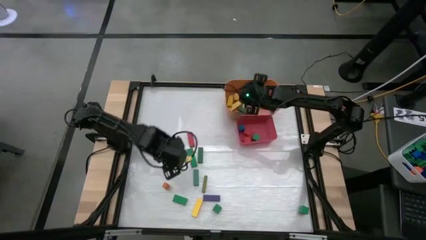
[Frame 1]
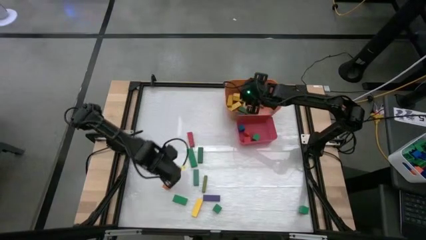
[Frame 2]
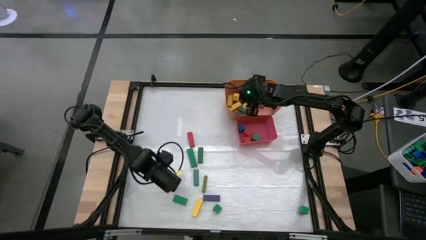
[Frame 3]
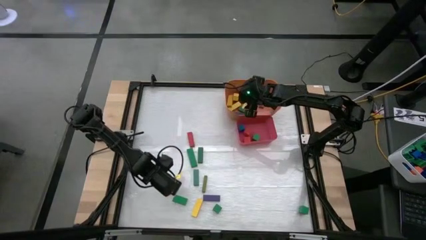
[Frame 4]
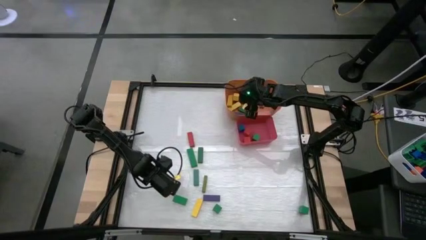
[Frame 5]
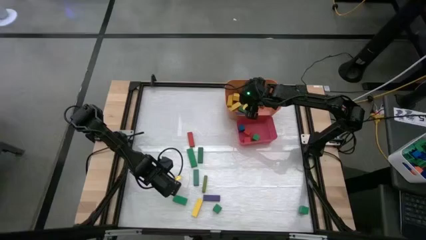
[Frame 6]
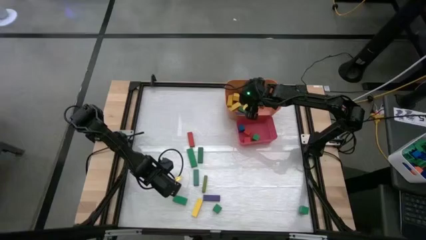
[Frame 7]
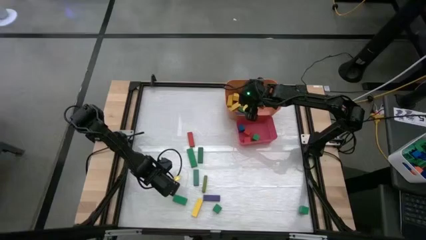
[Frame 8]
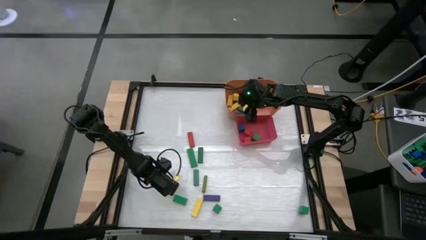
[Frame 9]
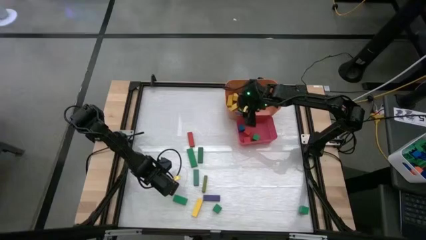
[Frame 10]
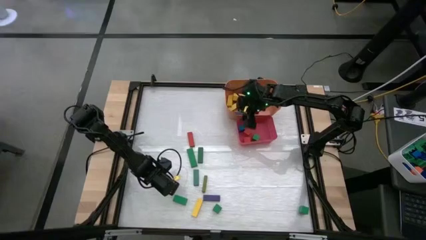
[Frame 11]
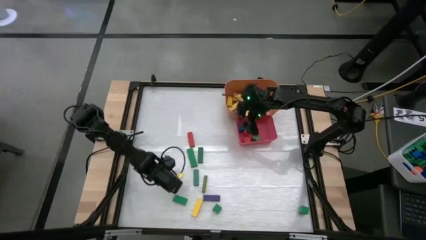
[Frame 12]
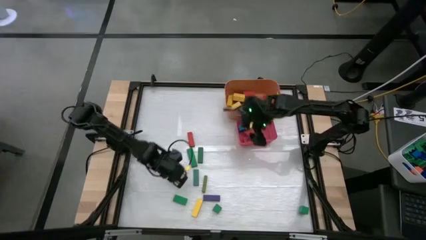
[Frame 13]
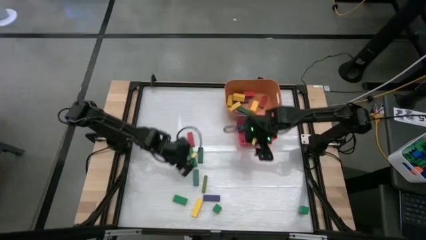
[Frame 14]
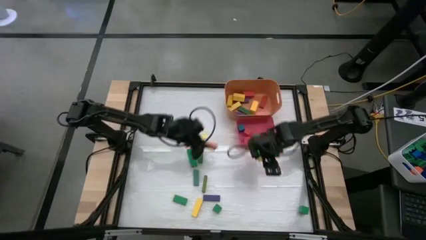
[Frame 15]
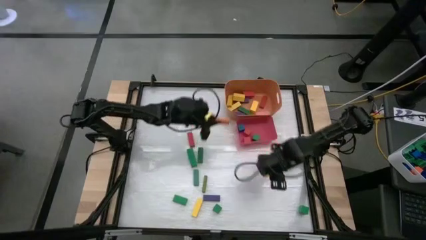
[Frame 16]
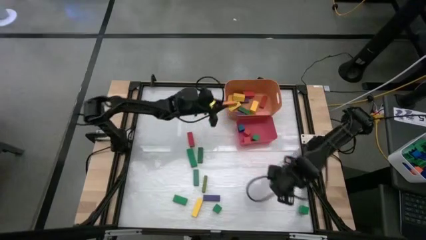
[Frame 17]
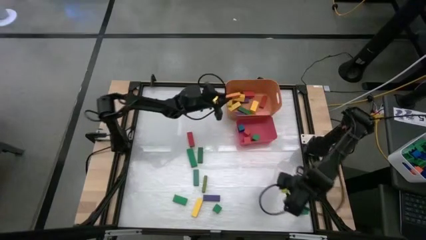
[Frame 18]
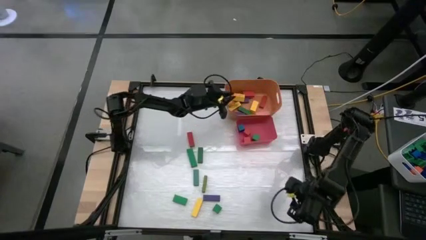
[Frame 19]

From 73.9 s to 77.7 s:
Task: Sort blocks by size
Put the orange rectangle block into the orange bin

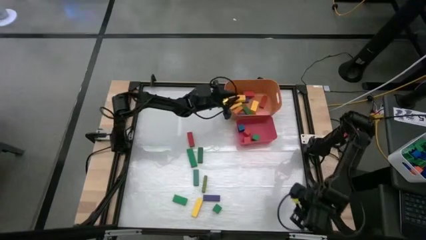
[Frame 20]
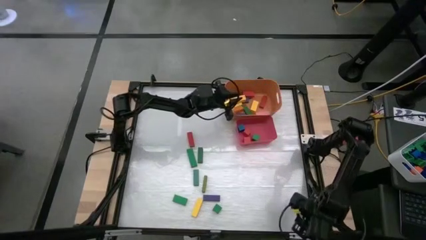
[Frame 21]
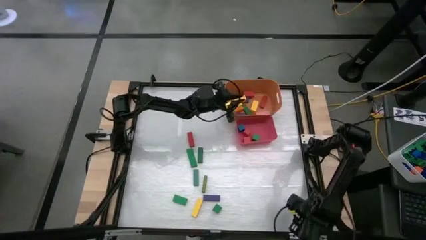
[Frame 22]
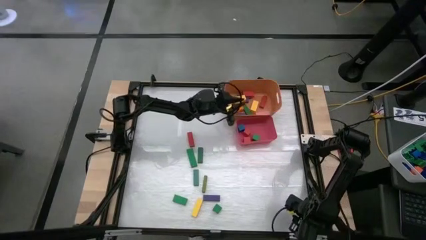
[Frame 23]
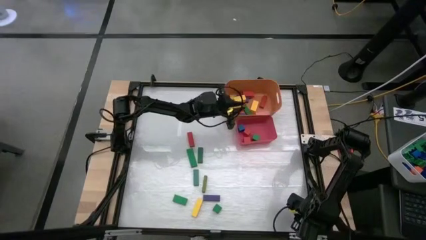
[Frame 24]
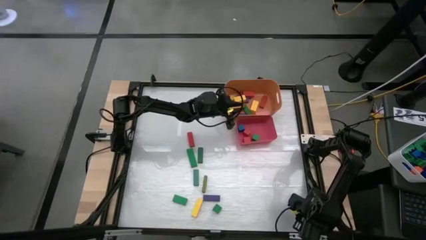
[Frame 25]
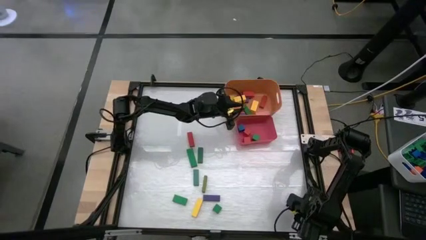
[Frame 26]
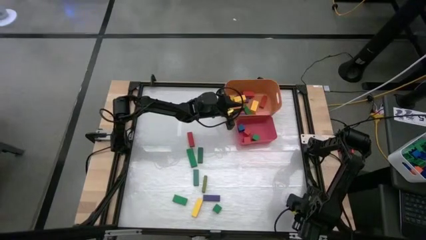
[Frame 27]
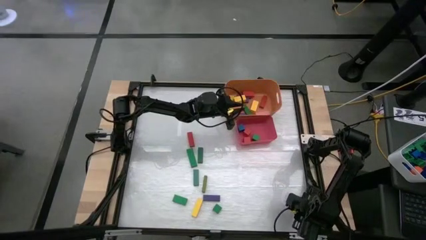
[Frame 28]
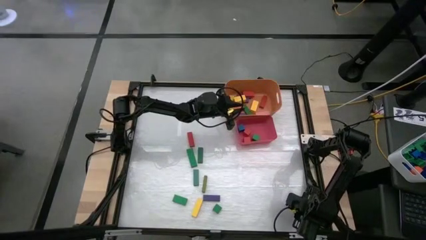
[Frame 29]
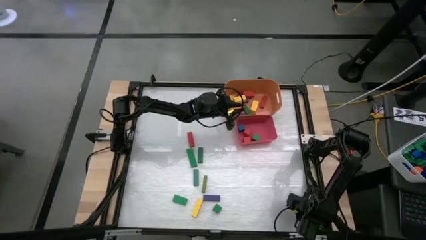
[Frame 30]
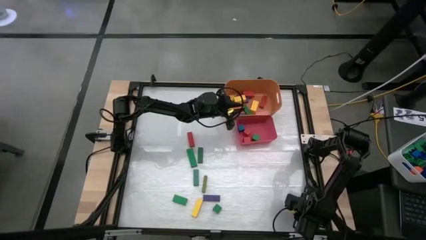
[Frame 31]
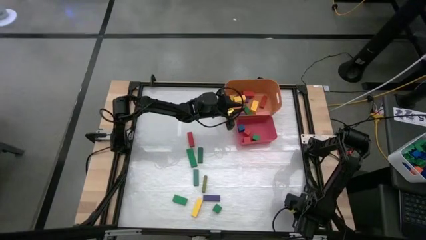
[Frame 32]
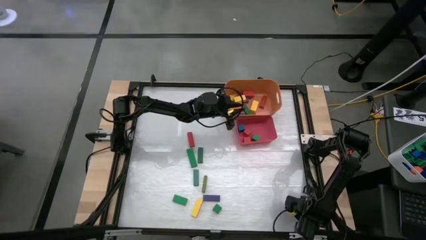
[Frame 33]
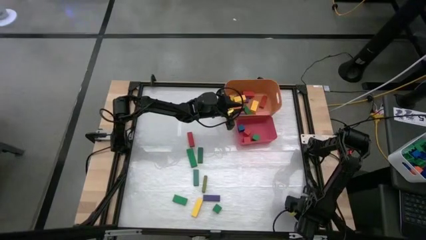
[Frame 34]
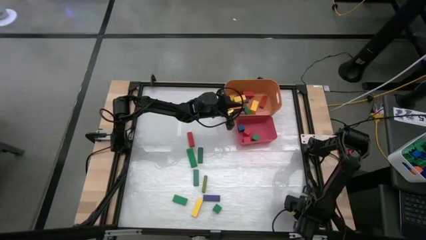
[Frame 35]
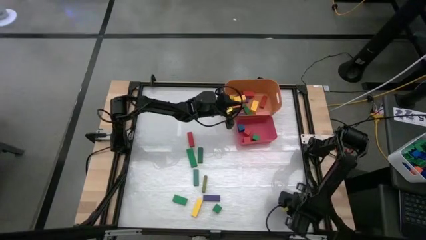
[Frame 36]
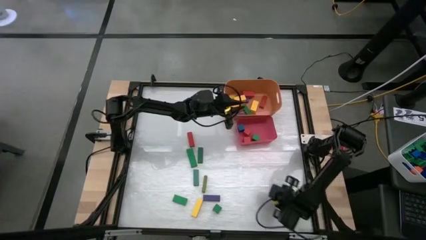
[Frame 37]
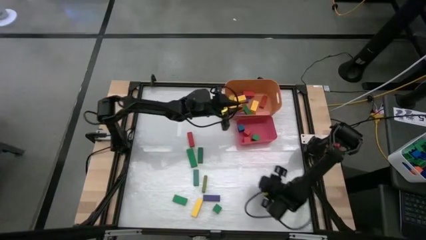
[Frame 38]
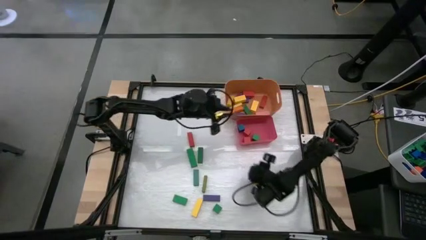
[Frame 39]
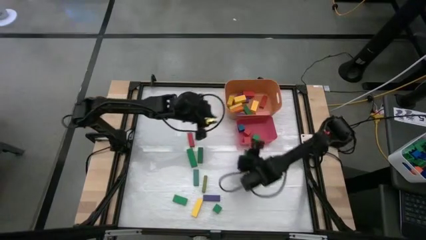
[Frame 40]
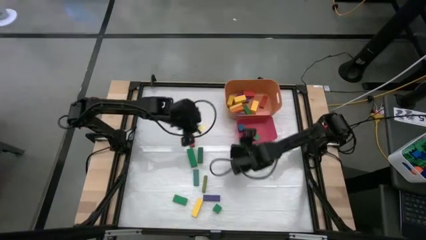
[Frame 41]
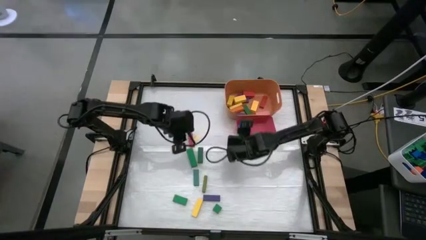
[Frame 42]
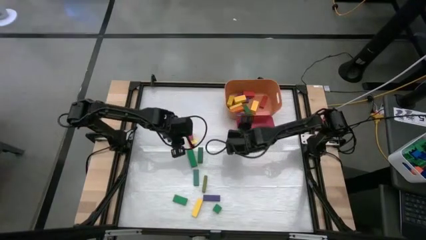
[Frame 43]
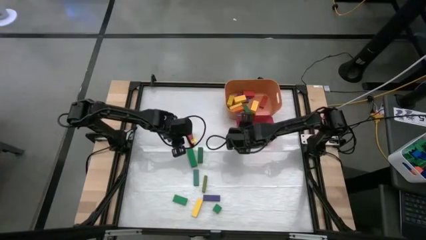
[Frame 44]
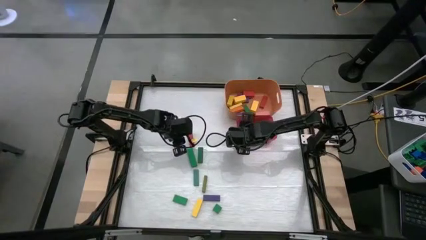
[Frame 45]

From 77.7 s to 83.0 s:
Put the green square block into the red bin

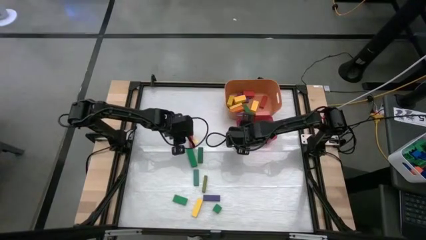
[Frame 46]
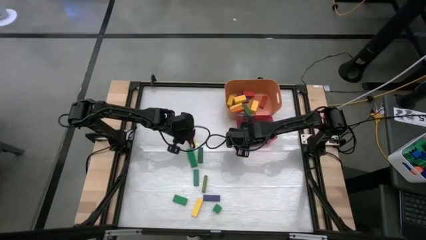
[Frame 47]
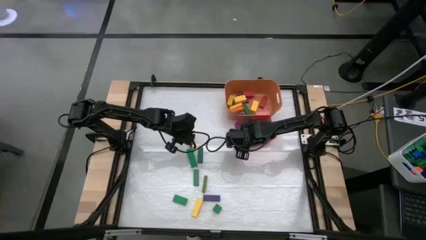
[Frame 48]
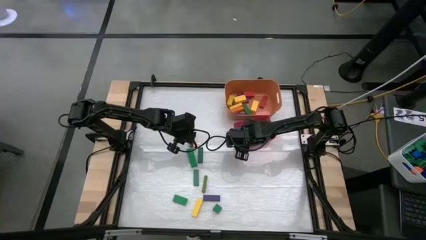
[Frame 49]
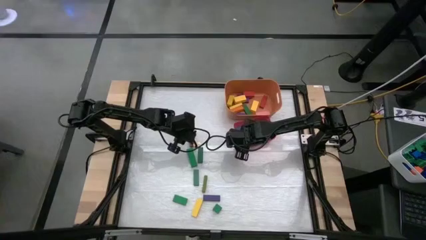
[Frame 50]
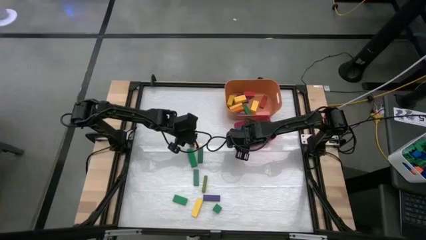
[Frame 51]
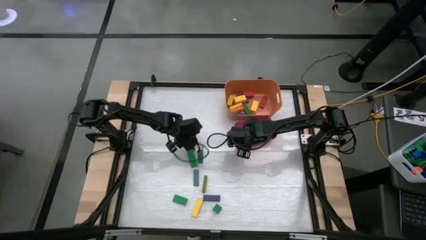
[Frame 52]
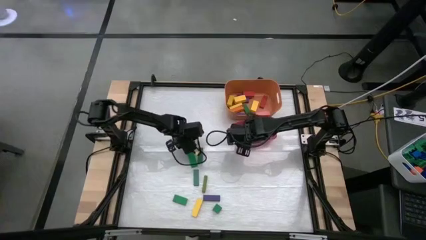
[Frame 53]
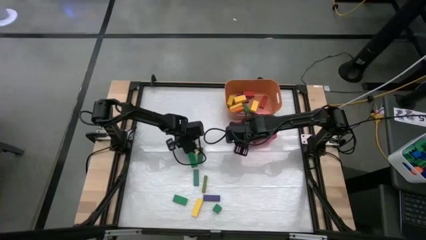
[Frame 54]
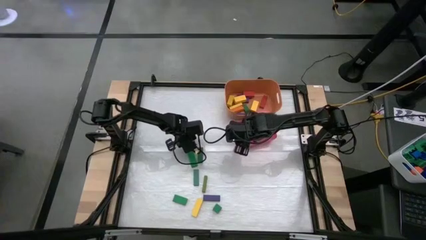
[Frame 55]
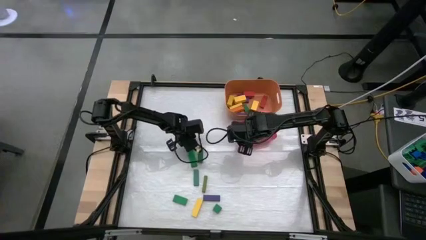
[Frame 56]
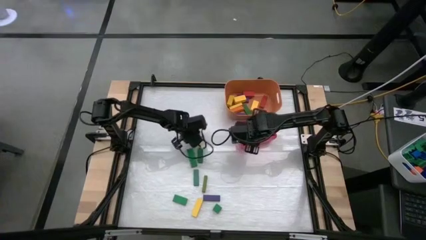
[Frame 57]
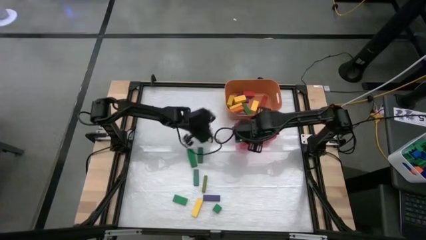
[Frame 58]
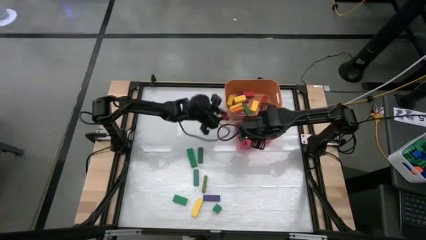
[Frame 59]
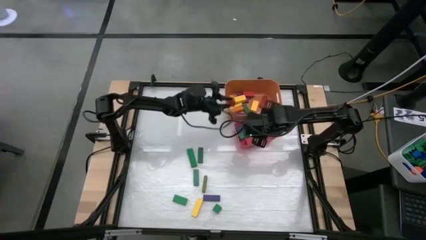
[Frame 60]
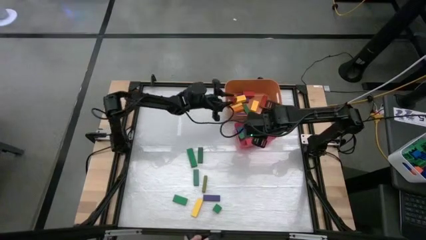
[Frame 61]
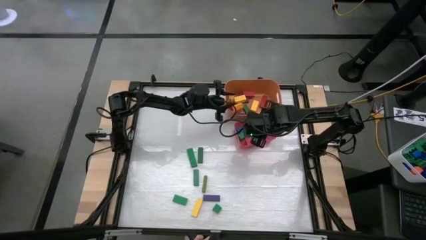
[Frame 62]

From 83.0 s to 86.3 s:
Put the red rectangle block into the orange bin

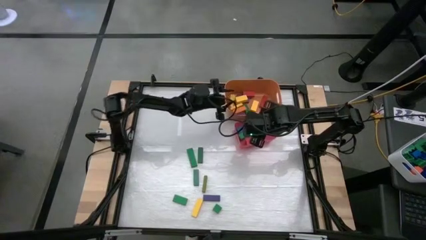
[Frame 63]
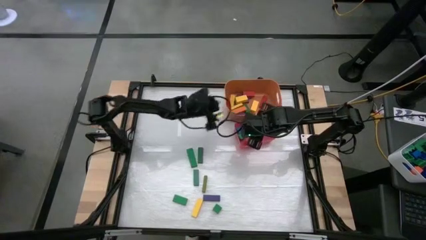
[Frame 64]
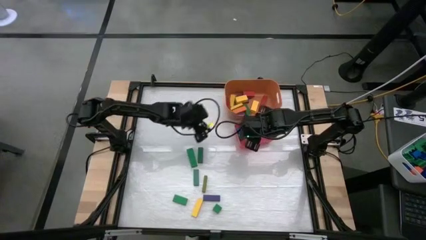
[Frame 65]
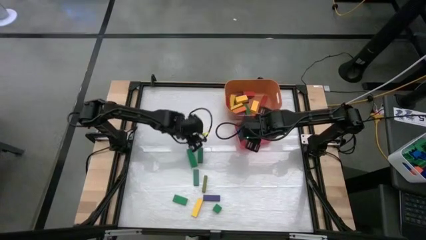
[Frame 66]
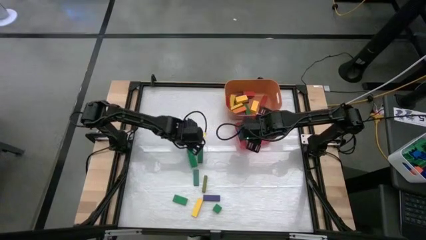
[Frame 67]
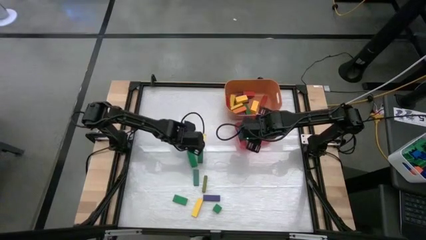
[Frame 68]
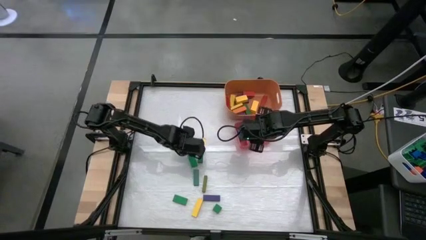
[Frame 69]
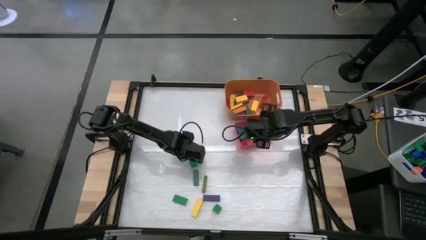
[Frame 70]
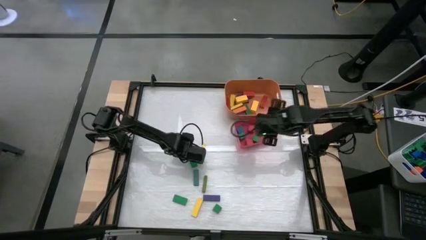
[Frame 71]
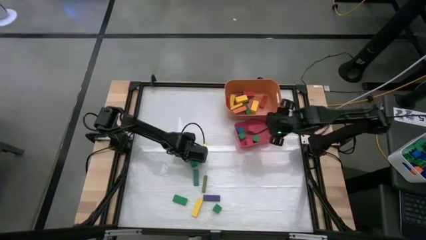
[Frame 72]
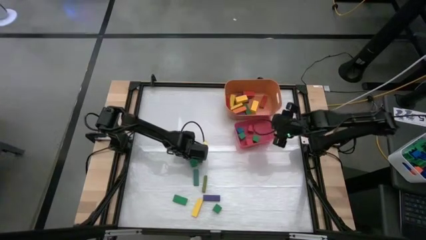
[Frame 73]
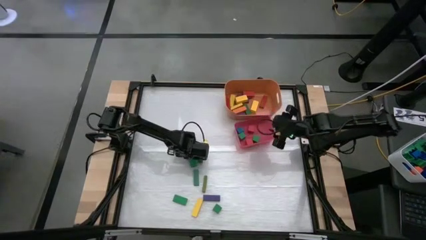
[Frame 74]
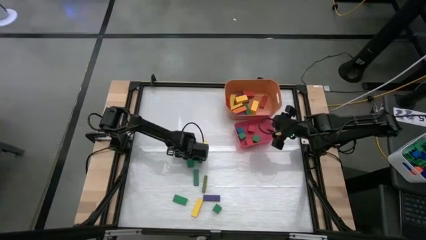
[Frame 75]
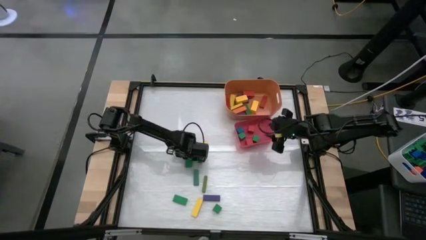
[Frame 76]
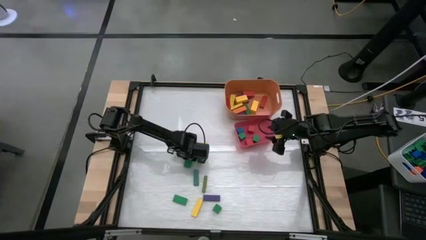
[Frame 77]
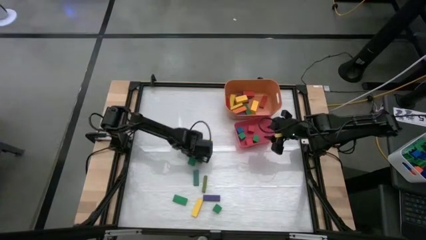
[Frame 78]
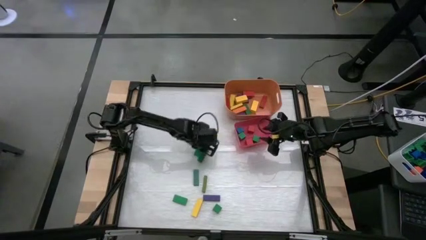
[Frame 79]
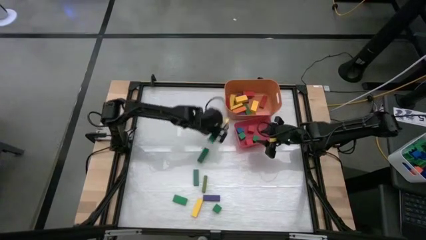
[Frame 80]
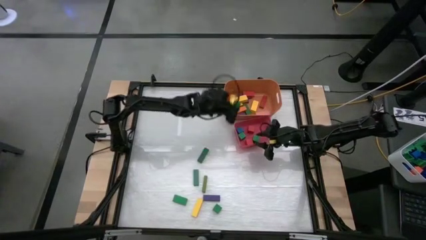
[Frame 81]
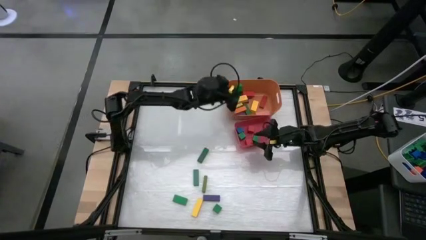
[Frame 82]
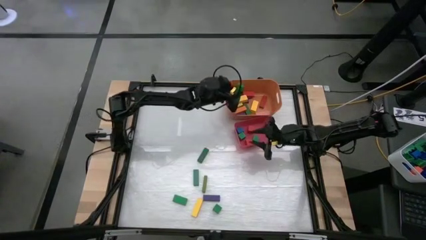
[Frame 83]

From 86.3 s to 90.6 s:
Put the green rectangle block into the orange bin
